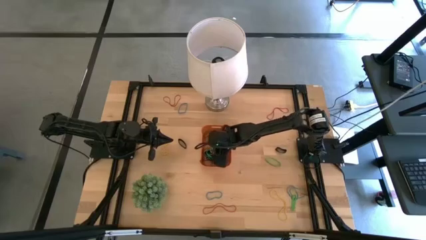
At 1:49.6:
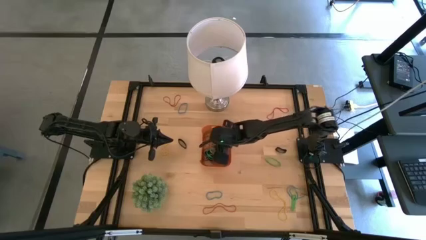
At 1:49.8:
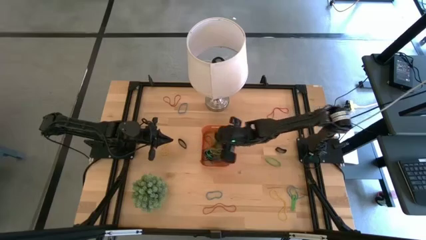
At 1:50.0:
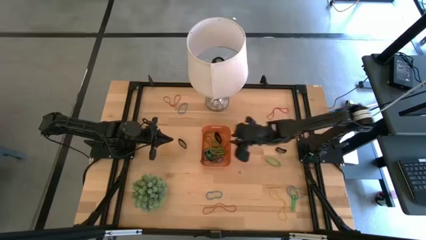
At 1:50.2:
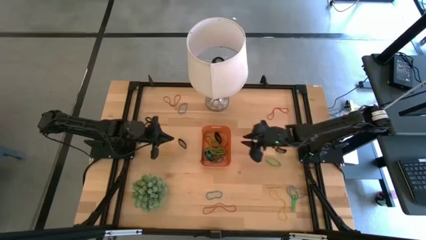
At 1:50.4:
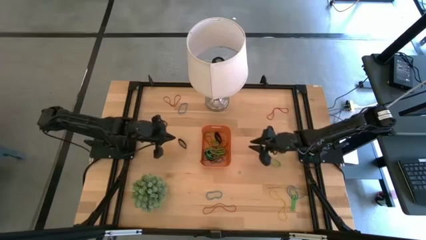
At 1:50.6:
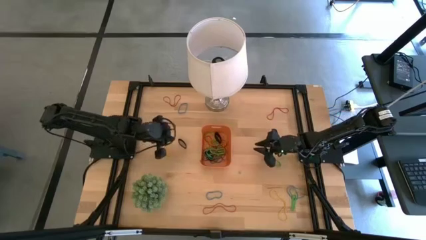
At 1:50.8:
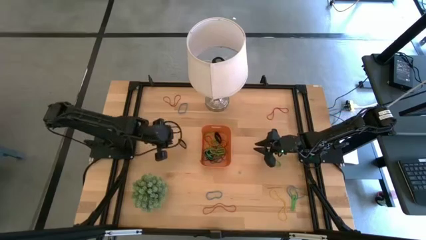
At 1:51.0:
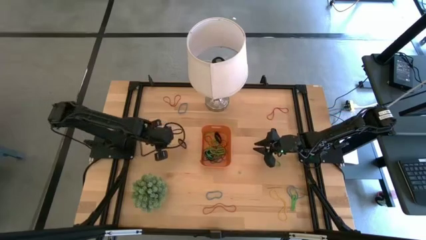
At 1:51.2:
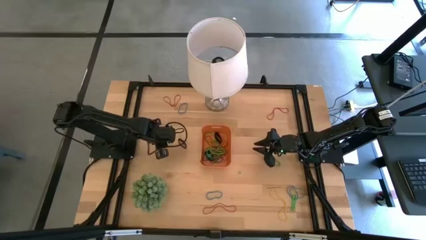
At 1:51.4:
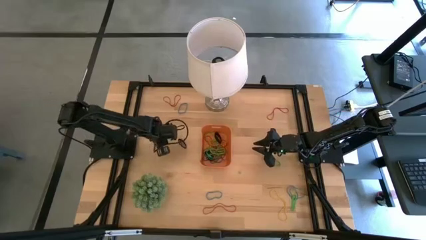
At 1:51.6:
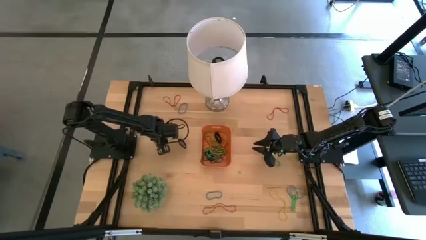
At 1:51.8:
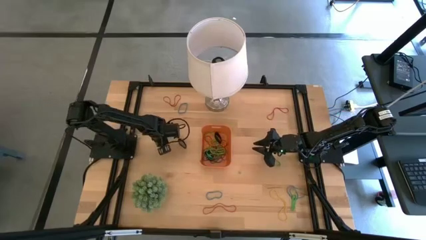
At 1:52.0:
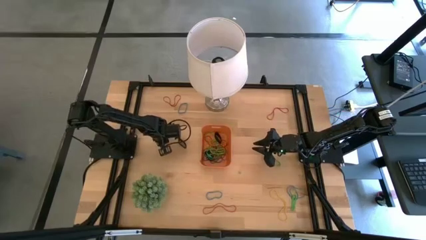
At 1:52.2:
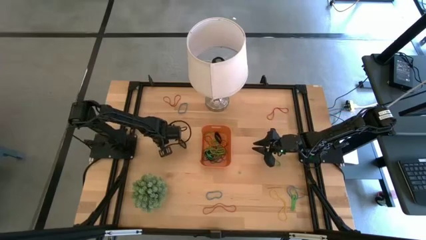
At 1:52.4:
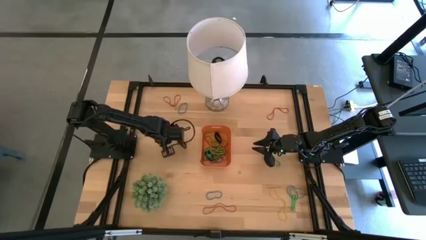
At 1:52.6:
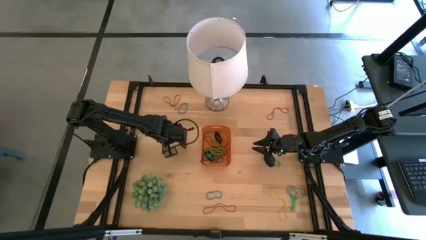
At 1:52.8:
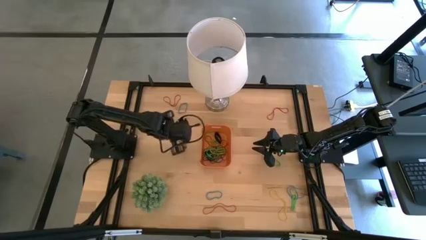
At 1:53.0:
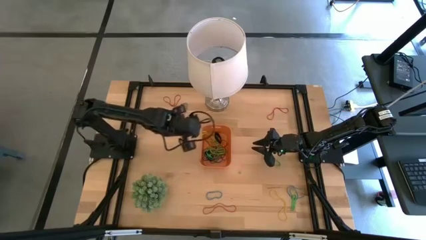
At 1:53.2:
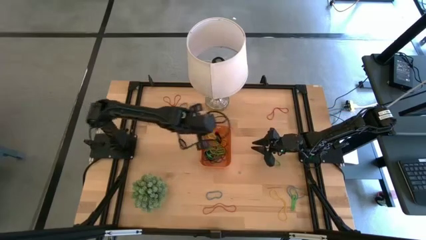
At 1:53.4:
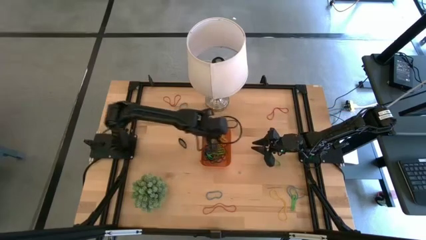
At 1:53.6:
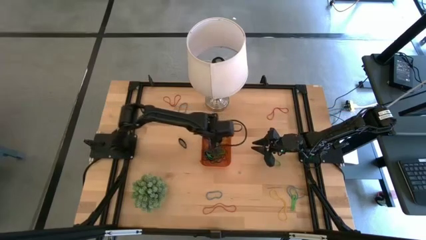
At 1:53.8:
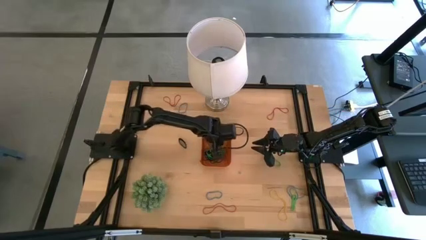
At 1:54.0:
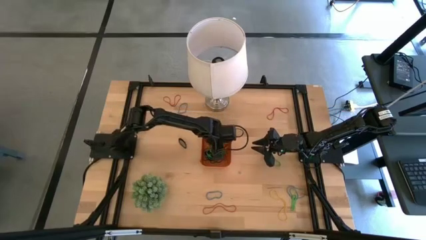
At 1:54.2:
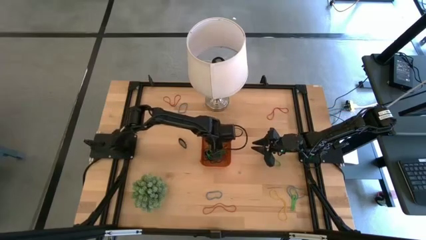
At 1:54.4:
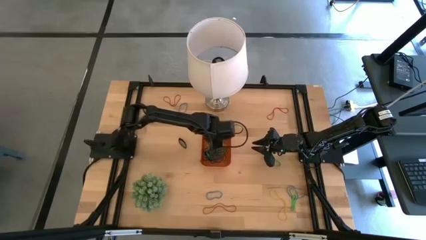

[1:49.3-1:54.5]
Task: Pick and place rubber bands into bin
Put the yellow rubber band into the orange bin

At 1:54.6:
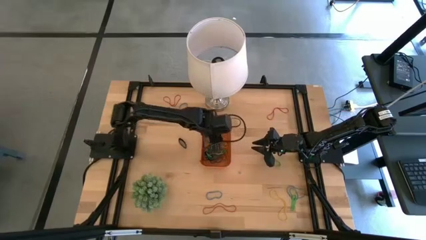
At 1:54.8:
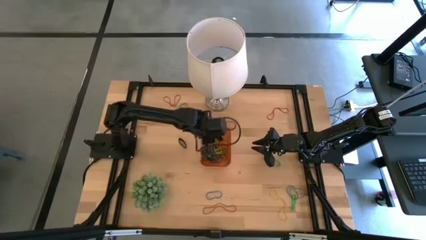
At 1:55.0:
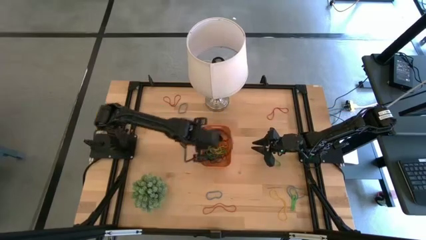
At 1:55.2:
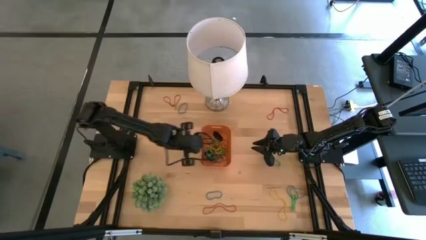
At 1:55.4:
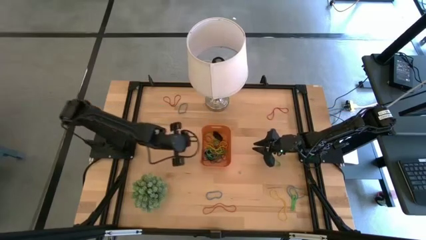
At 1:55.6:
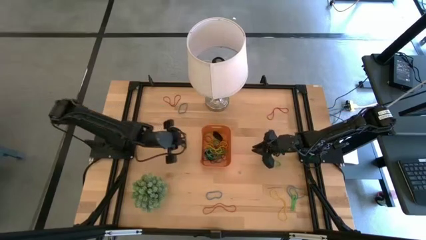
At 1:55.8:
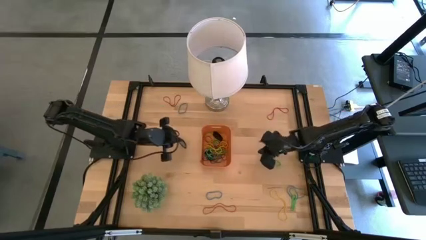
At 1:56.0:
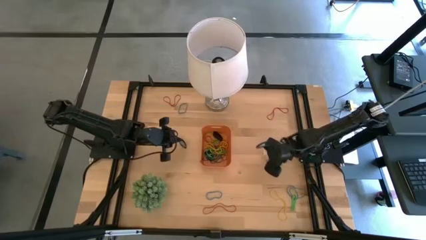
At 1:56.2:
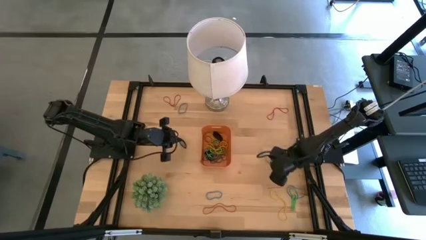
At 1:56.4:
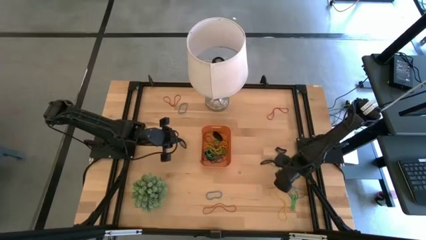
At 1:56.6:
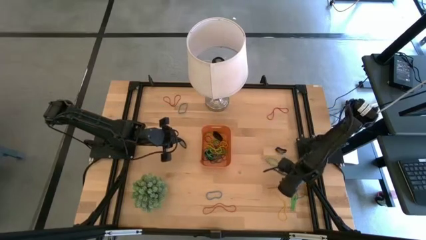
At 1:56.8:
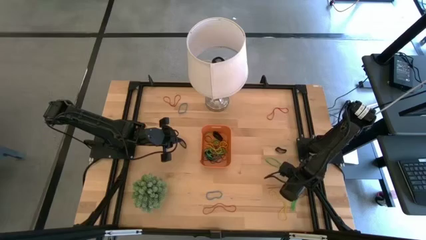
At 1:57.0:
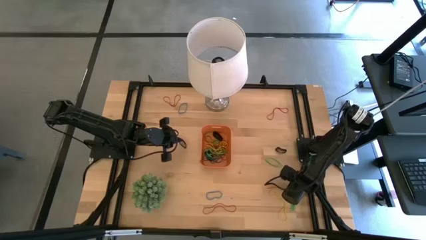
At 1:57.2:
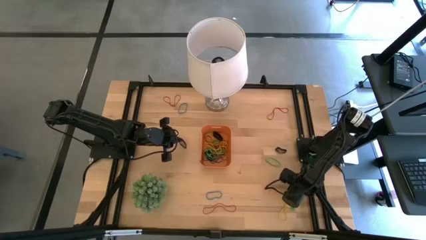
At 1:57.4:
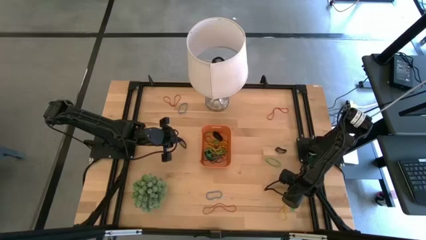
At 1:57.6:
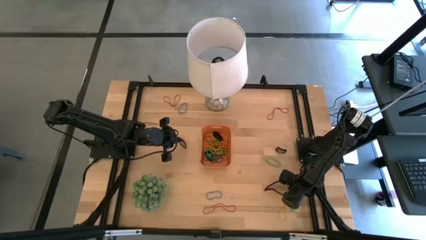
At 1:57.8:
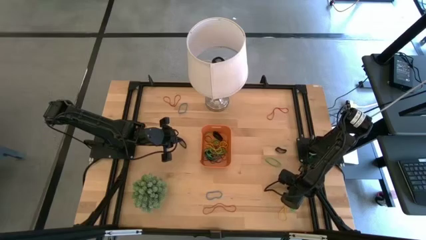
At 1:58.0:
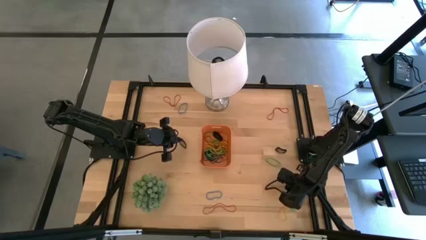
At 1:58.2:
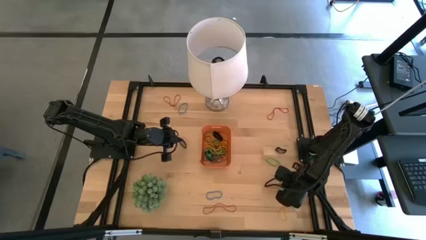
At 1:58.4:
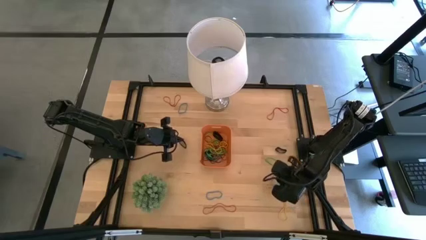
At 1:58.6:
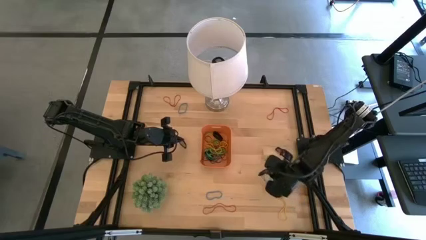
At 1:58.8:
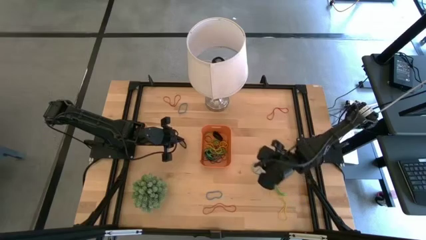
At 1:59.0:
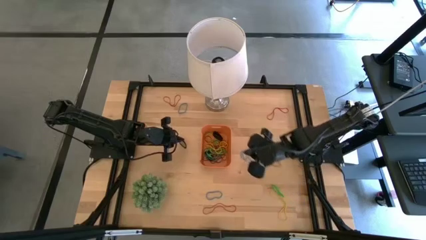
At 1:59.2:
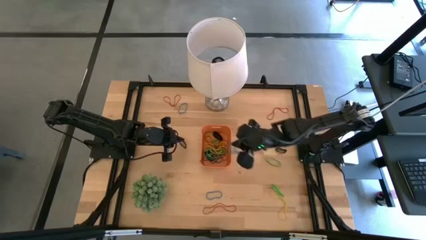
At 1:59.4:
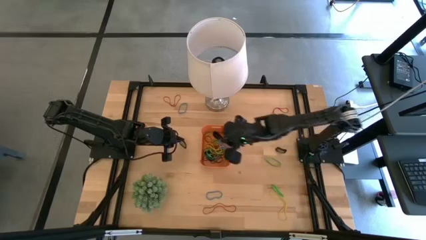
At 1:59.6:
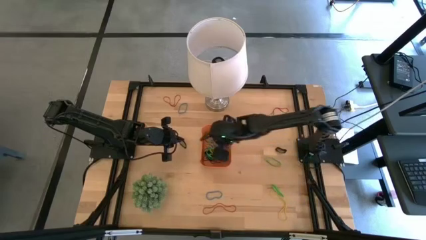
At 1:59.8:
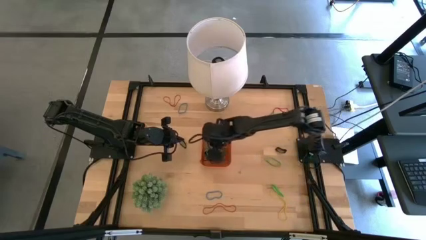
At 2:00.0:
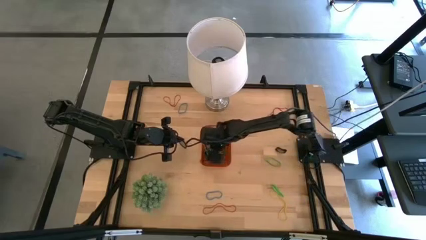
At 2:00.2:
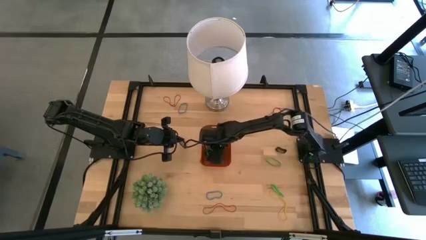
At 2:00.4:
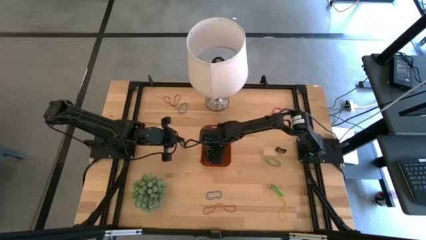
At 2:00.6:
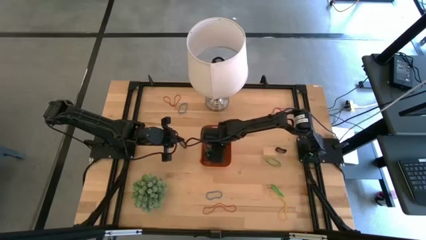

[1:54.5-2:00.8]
Put the blue rubber band into the orange bin

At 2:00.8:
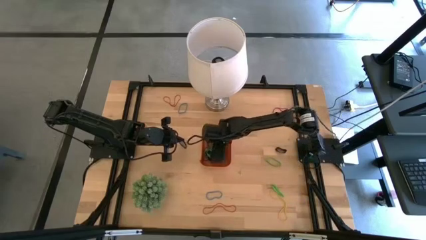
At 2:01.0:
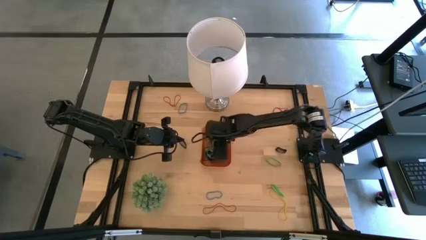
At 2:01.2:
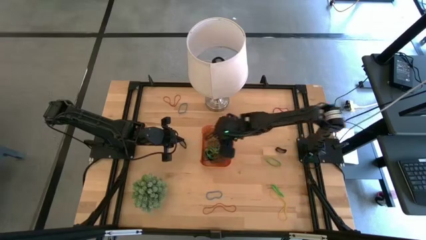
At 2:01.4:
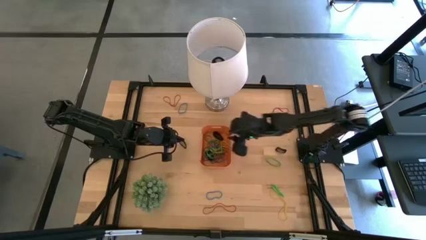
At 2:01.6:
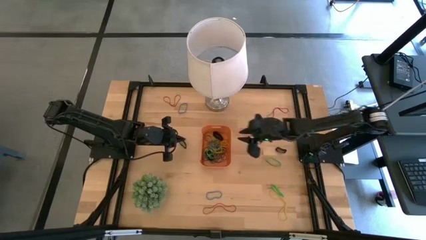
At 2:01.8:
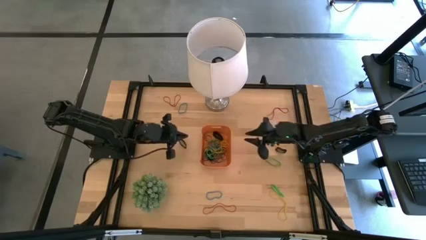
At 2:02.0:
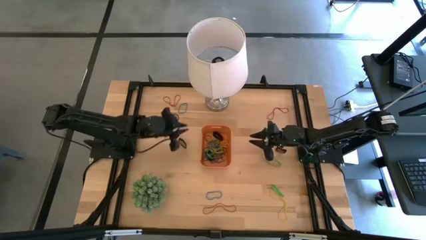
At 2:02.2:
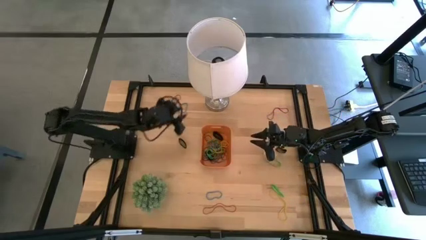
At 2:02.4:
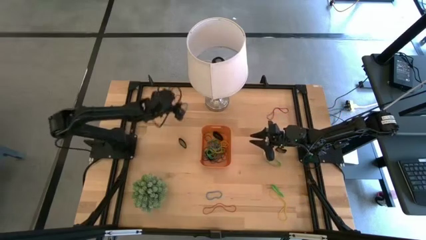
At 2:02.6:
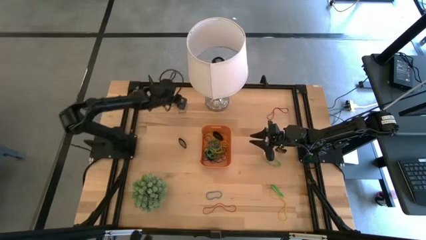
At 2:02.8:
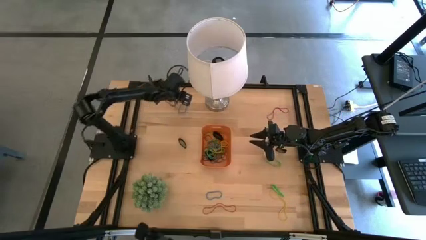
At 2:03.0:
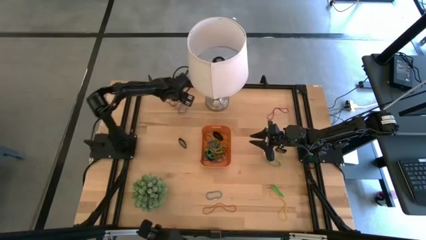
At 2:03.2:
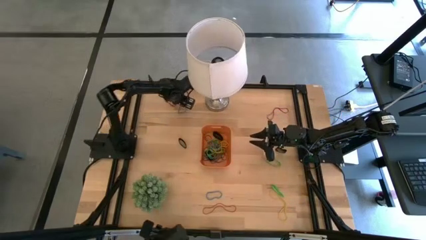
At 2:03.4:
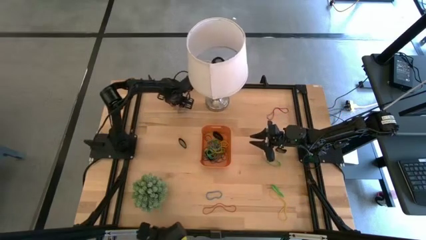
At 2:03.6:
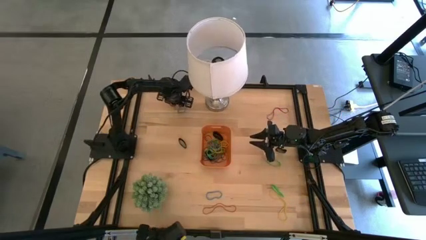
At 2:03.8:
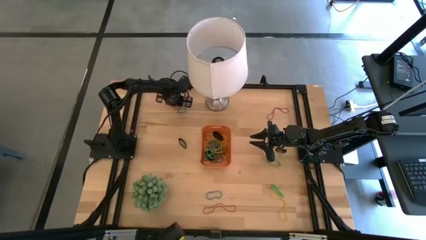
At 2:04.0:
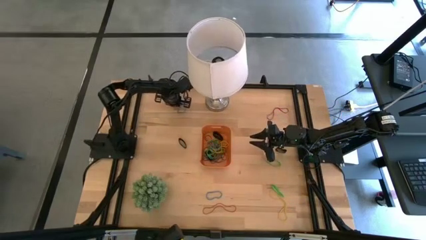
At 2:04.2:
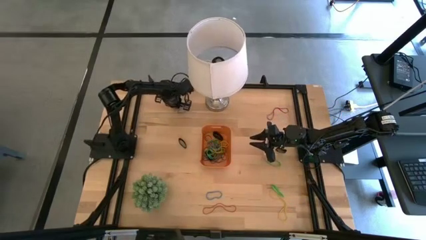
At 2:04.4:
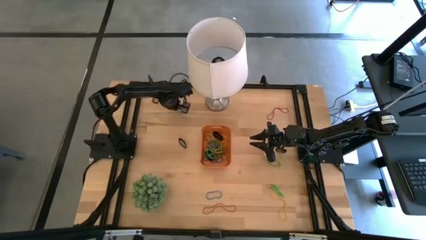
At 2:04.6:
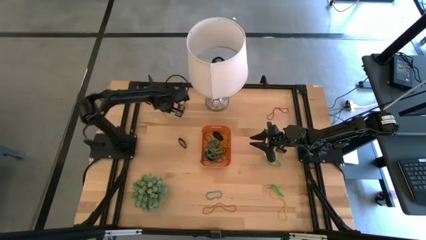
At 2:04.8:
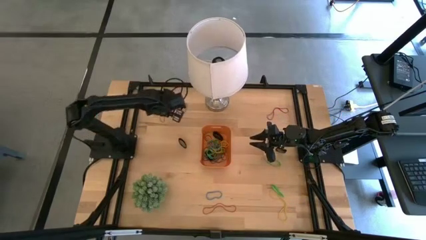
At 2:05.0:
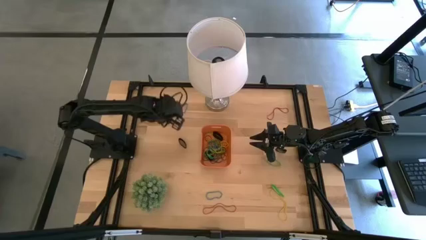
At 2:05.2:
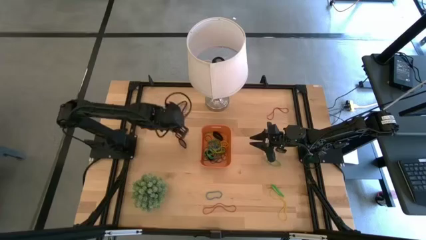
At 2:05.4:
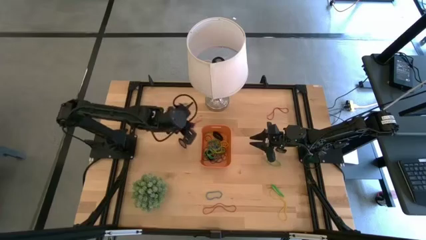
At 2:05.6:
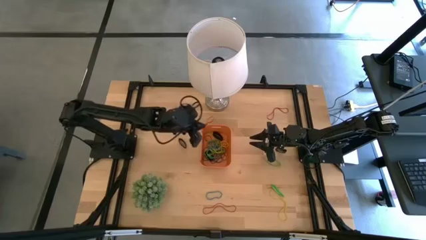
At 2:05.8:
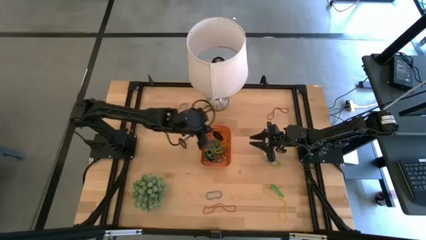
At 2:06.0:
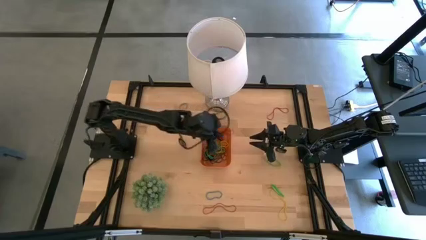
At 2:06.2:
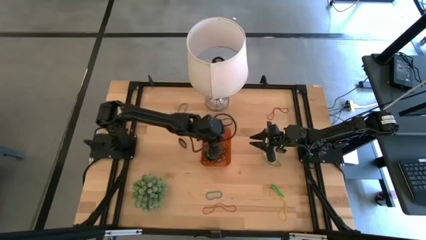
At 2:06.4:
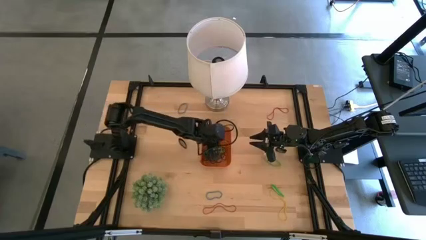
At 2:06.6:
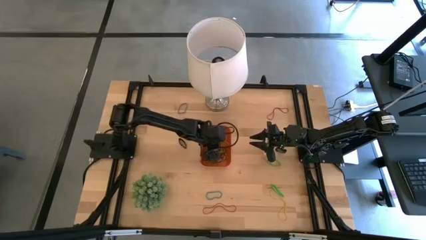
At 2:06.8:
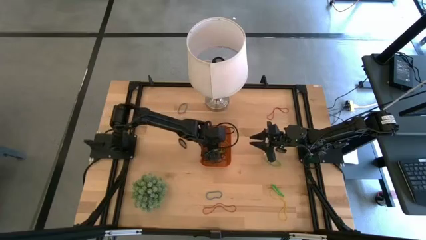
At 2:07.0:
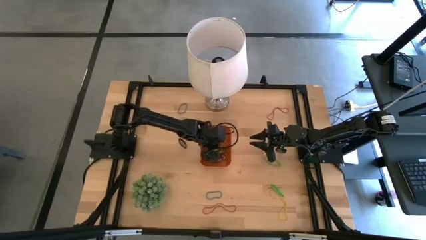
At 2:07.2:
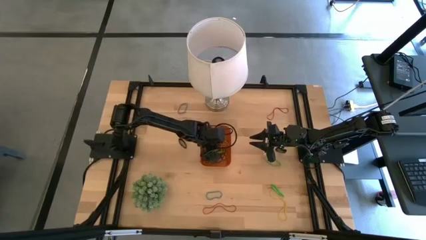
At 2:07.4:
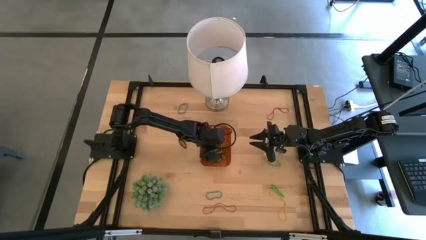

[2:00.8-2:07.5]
Put the red rubber band into the orange bin
